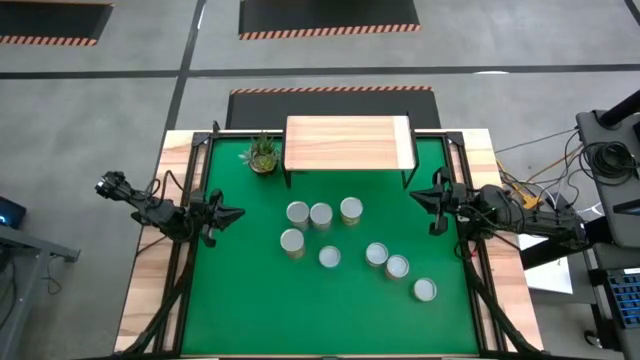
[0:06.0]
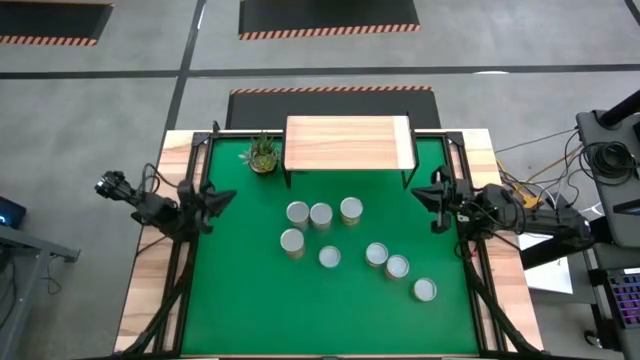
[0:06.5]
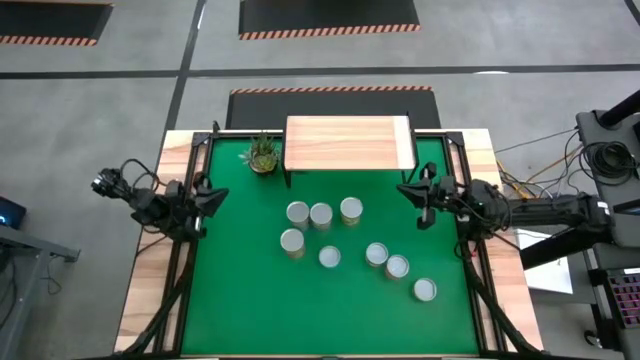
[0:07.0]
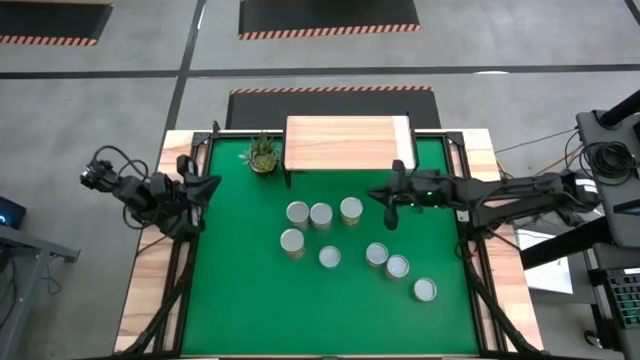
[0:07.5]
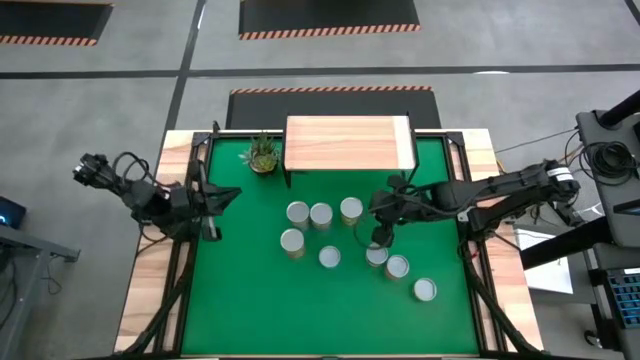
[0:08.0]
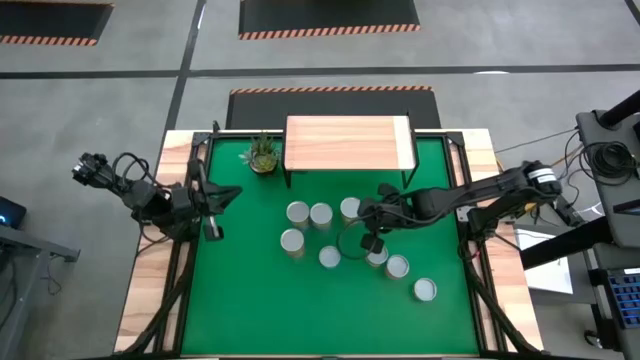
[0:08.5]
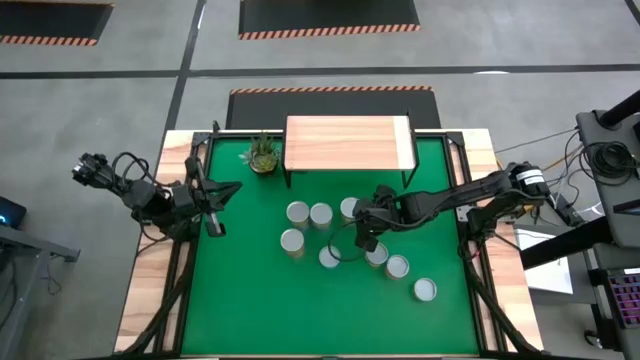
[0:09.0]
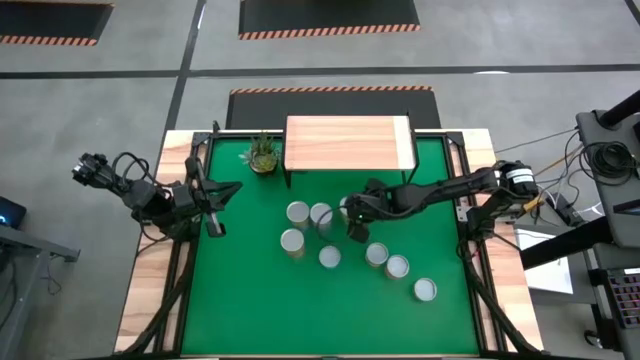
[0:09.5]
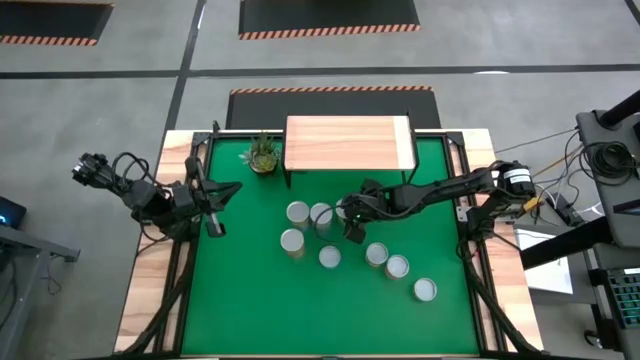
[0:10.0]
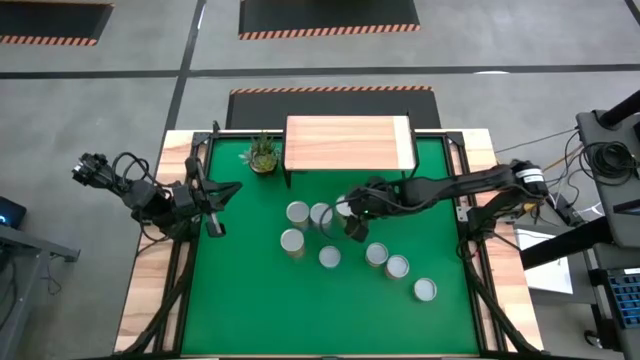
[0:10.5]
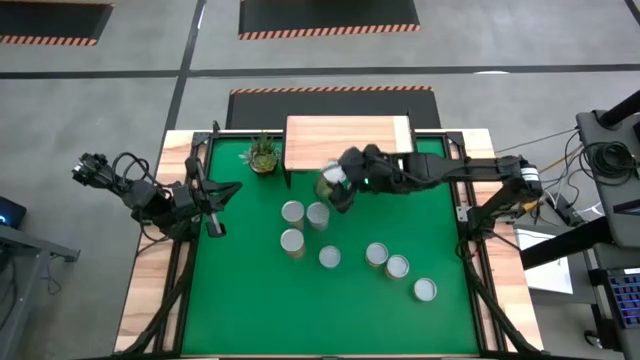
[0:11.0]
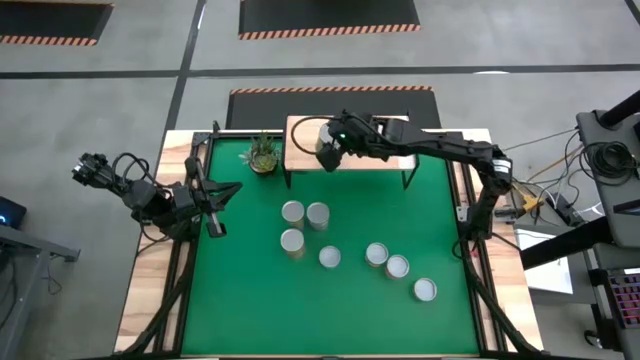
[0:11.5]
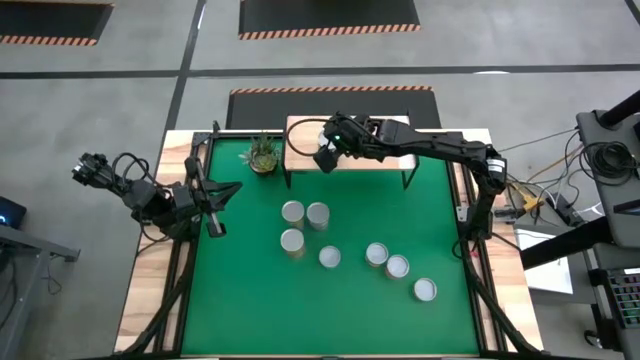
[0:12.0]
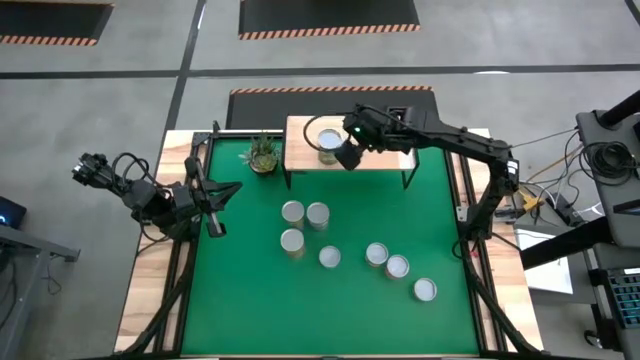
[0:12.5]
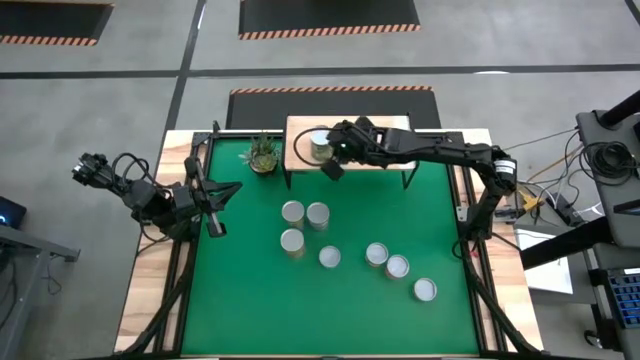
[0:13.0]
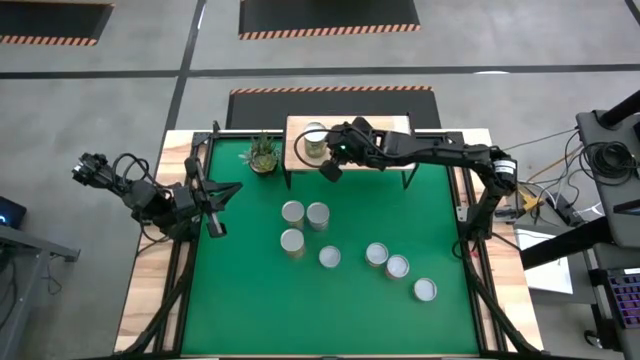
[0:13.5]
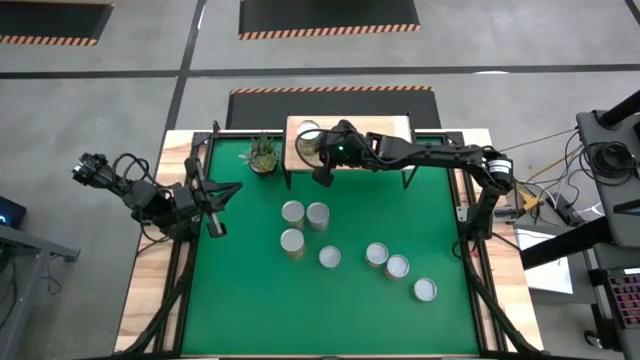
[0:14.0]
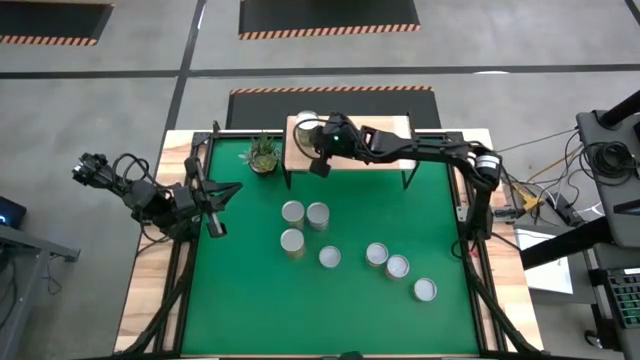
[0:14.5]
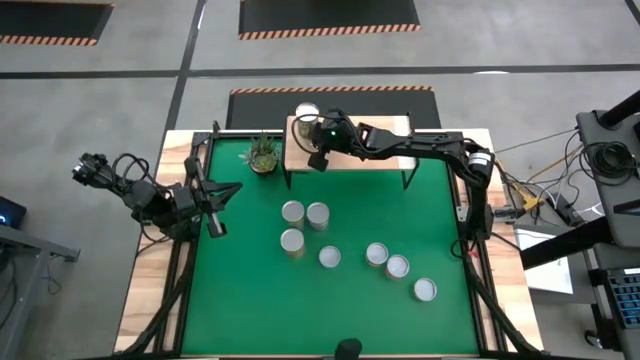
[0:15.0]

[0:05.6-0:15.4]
Task: Pick and place cans onto a shelf
Put the canned pears on the shelf

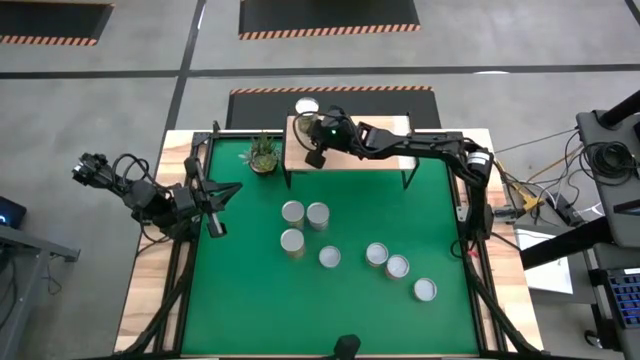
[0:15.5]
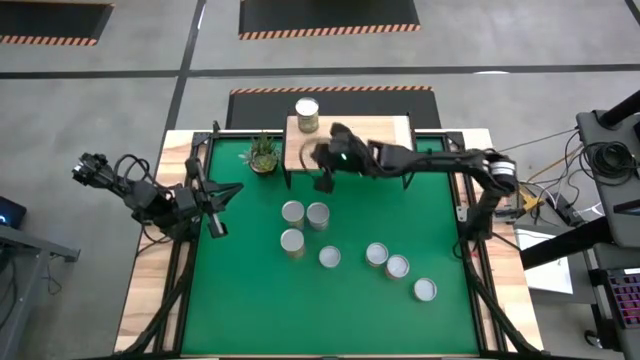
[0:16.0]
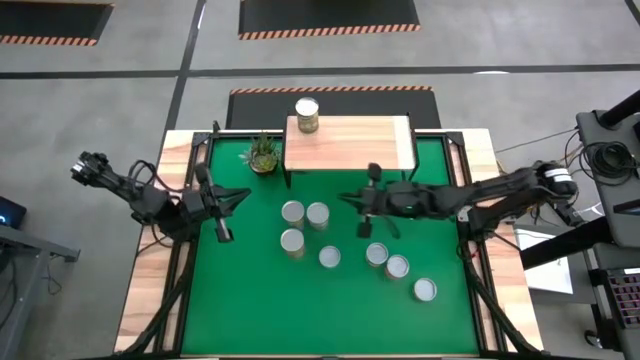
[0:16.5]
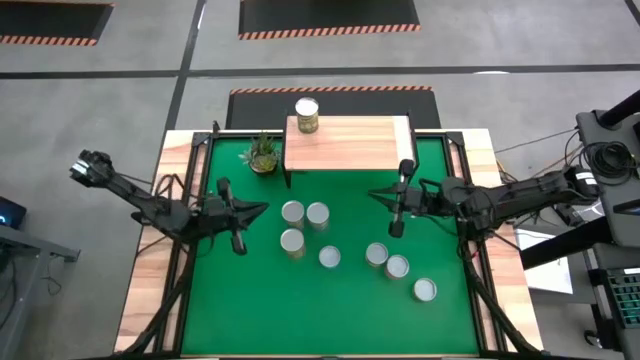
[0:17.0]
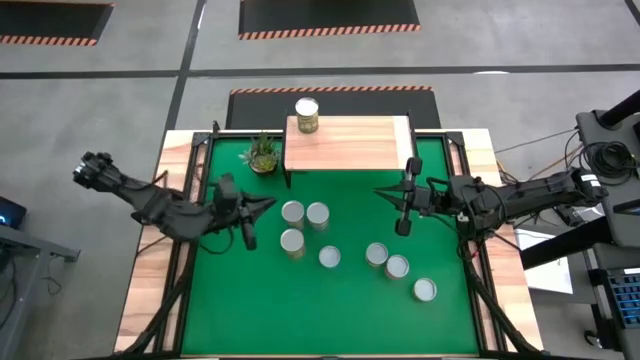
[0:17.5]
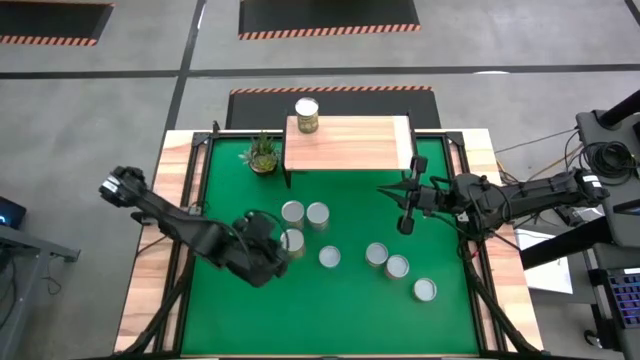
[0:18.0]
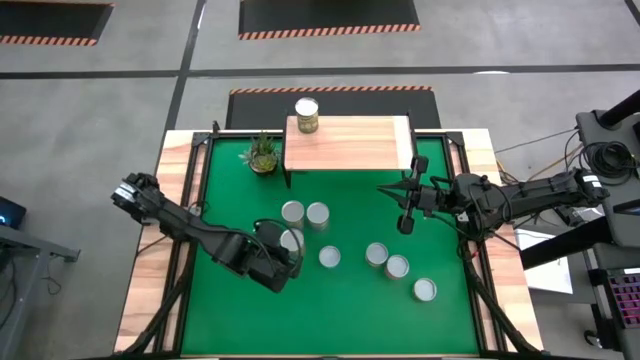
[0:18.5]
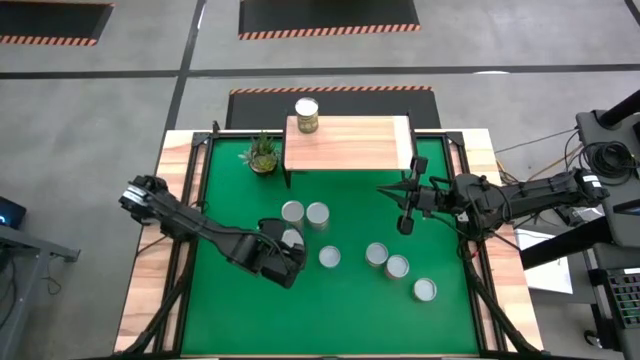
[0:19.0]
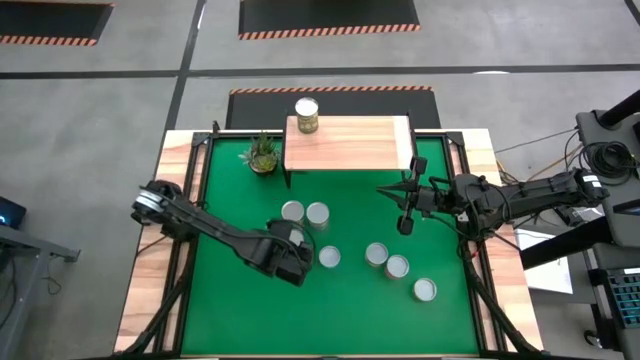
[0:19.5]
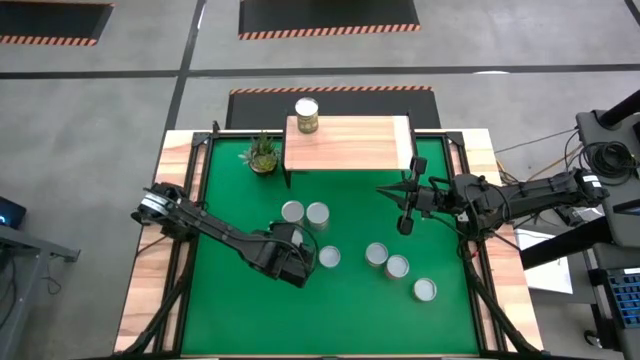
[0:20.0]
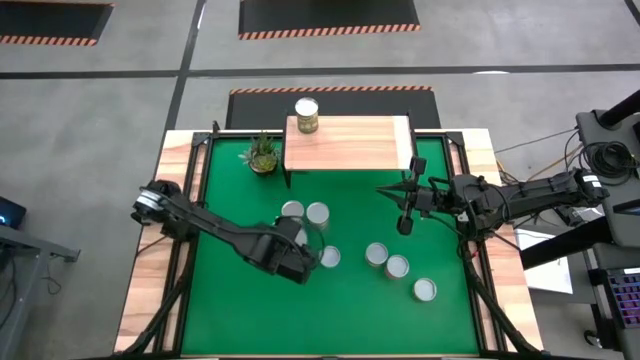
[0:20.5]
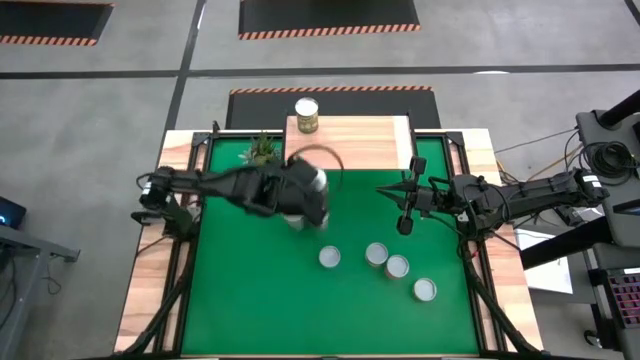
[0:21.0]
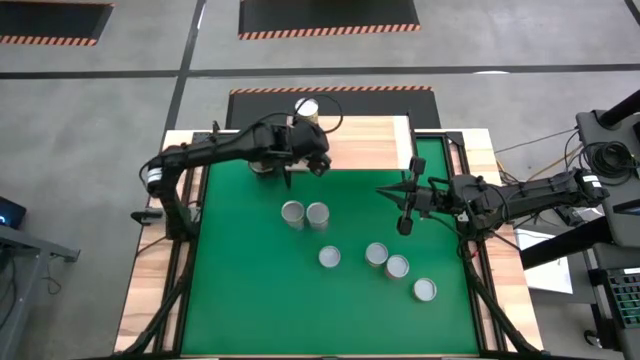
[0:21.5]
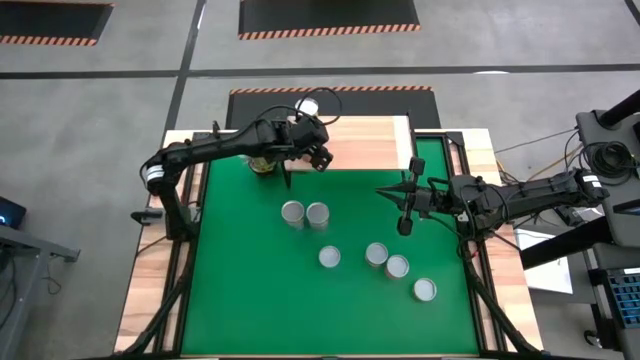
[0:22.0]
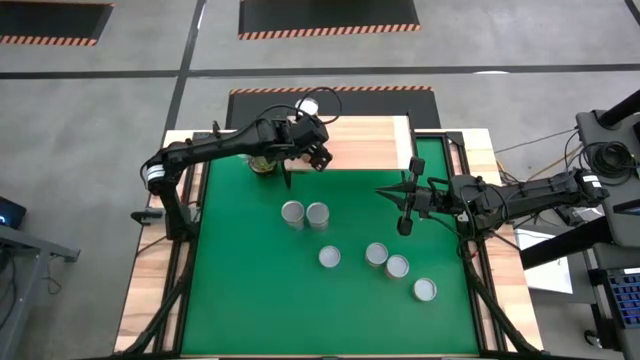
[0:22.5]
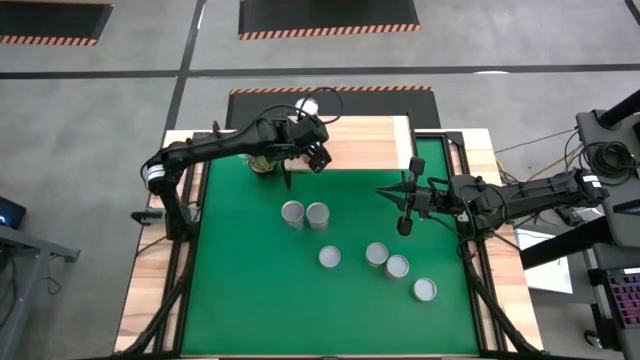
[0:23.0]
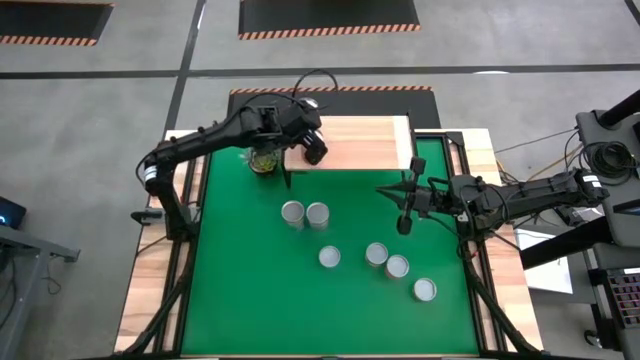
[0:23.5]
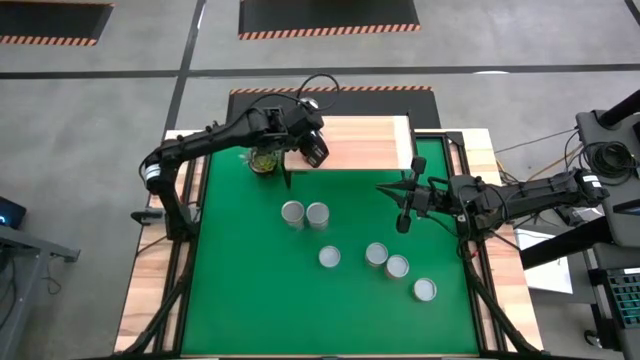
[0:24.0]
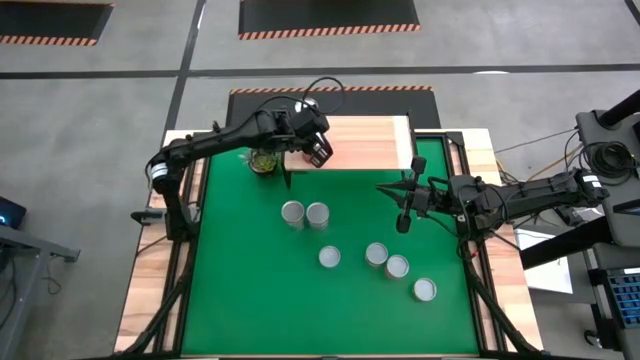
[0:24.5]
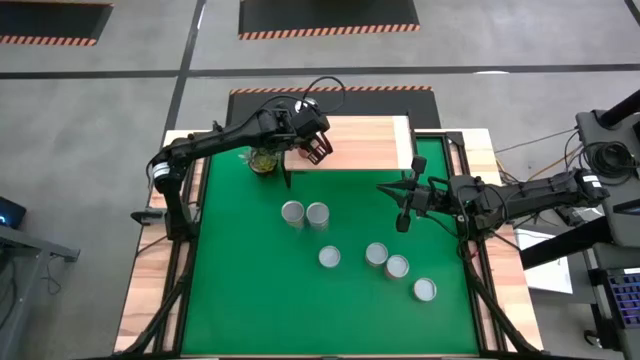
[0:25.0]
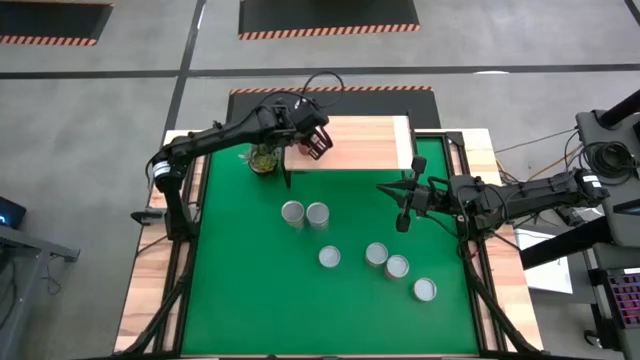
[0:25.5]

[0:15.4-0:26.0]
Put the canned pineapple on the shelf
